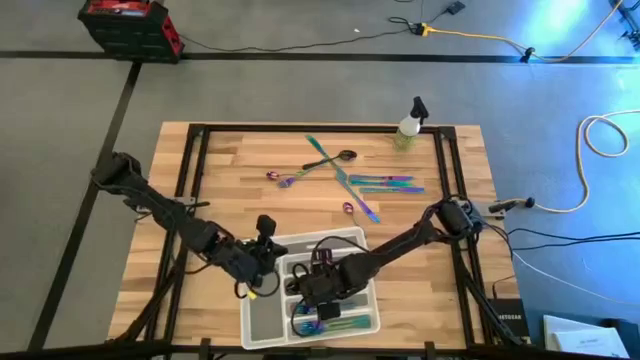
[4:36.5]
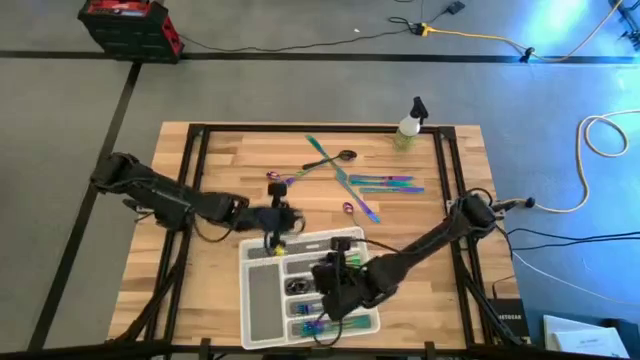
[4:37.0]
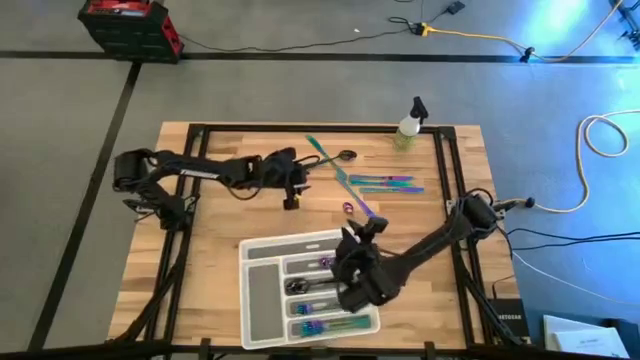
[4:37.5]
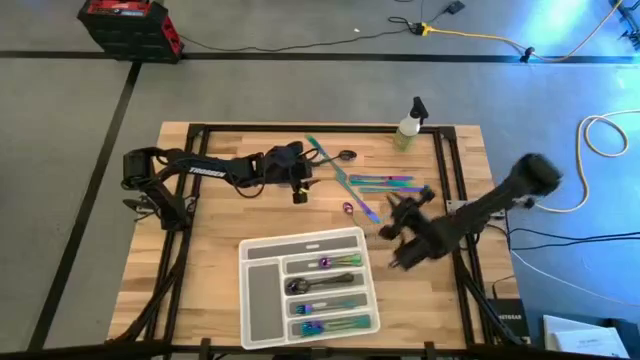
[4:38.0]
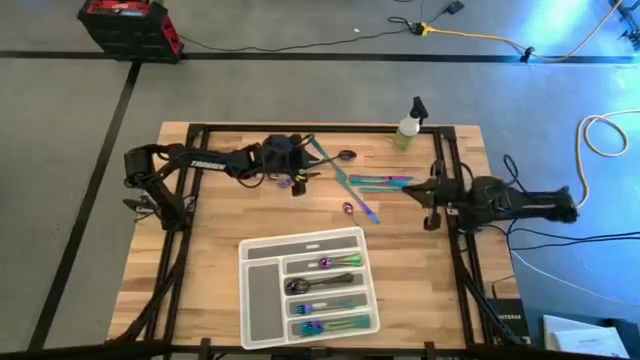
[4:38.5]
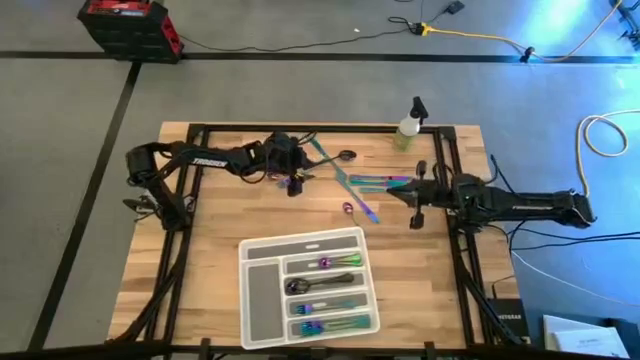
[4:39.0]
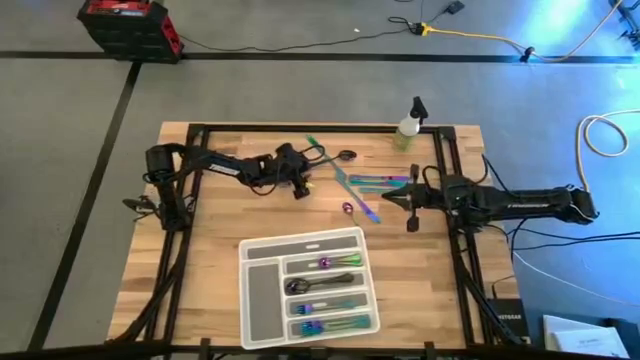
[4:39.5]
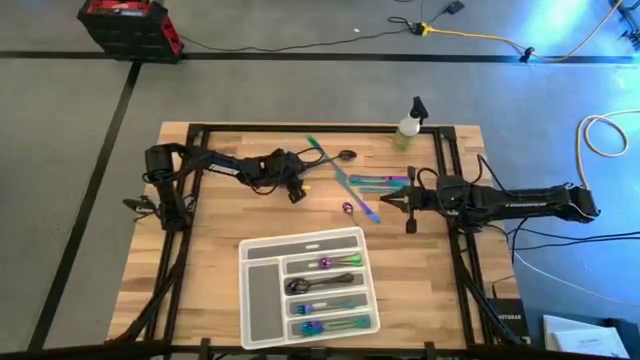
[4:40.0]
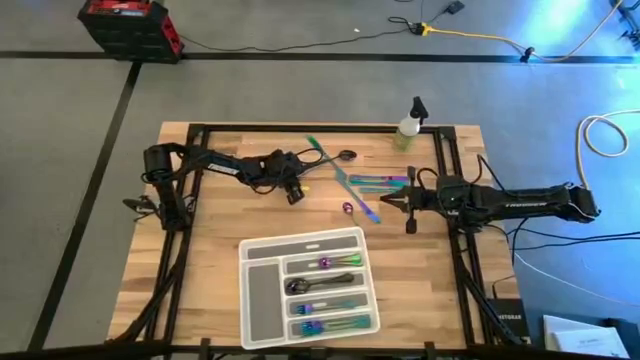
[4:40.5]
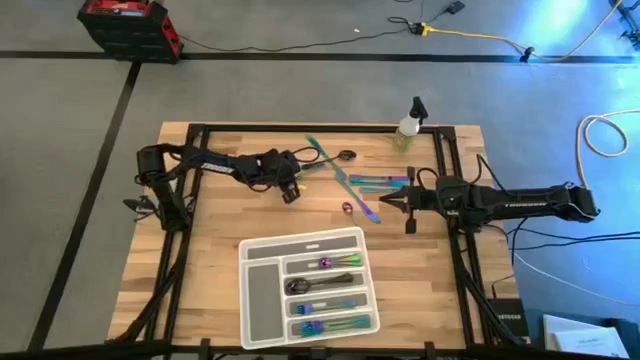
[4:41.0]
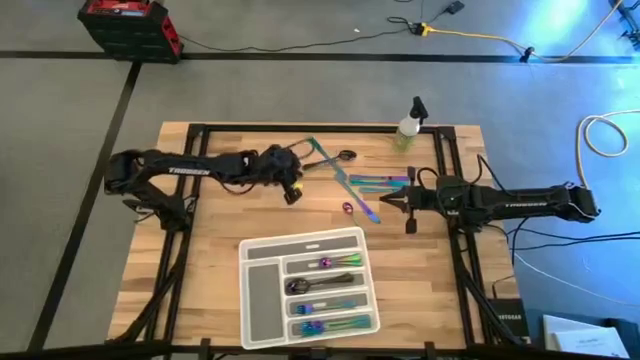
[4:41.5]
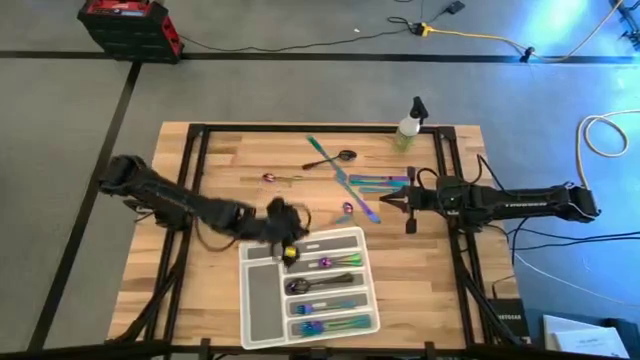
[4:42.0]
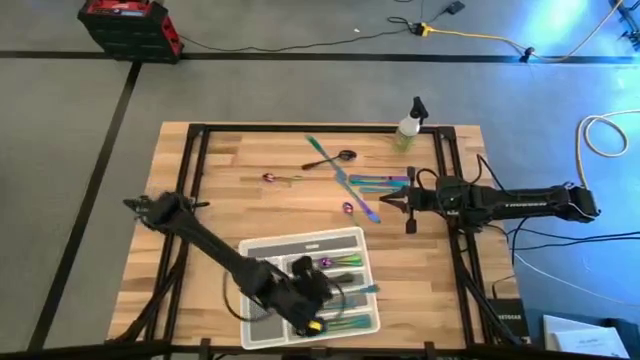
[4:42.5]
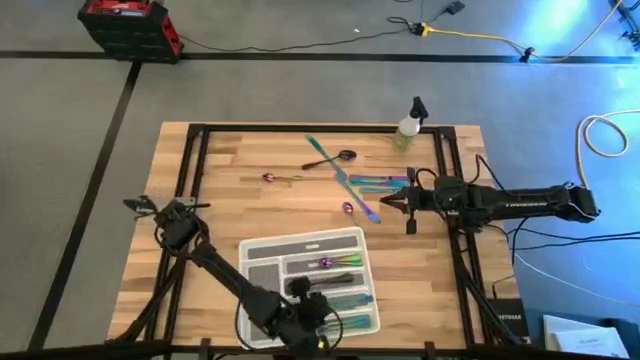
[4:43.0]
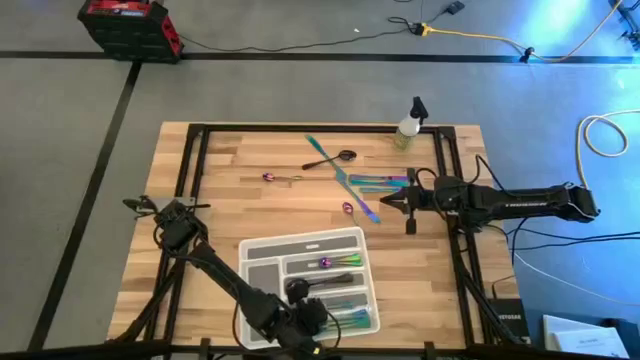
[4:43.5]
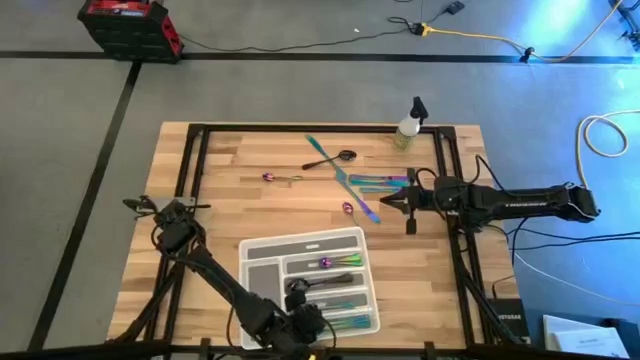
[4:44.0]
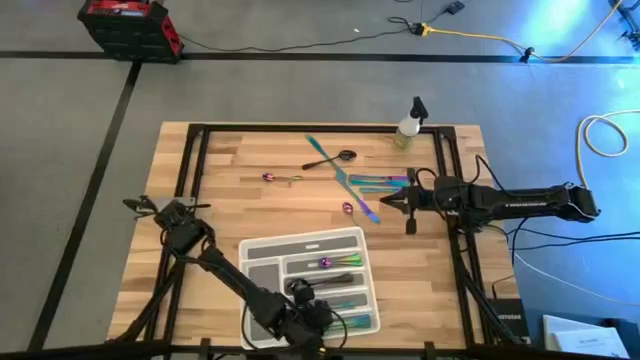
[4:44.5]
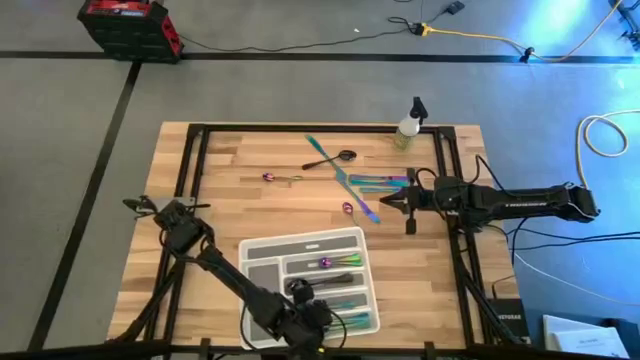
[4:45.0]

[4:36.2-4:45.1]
Task: Sort silverware
Put the blue fork into the white silver tray

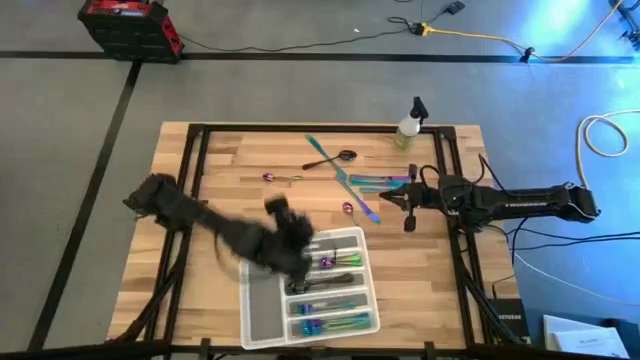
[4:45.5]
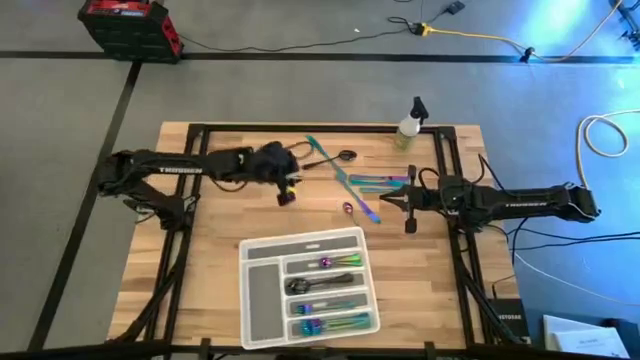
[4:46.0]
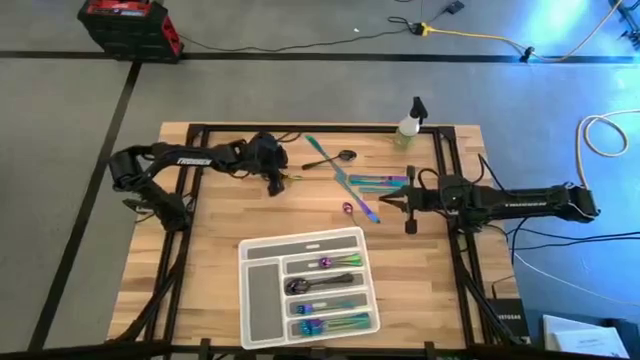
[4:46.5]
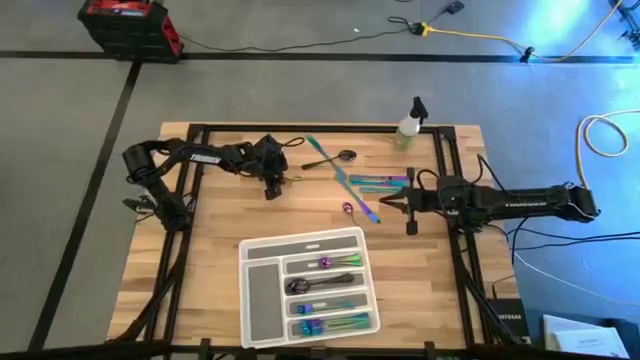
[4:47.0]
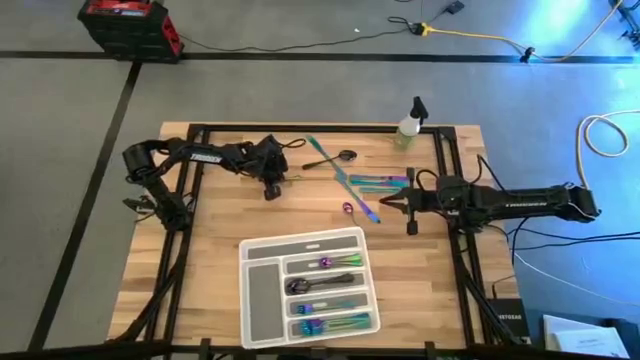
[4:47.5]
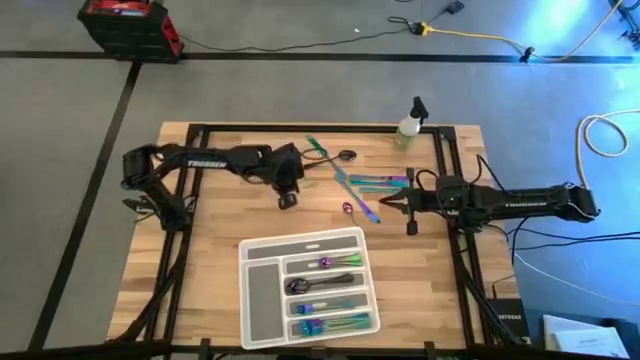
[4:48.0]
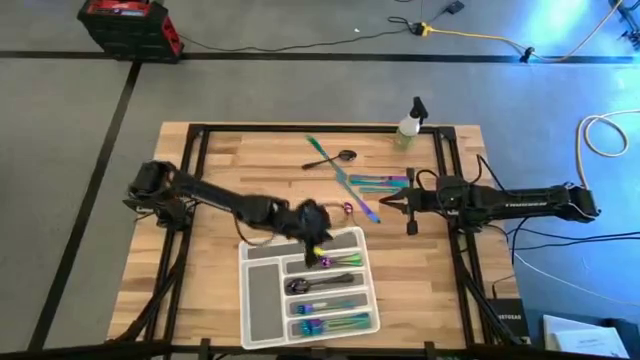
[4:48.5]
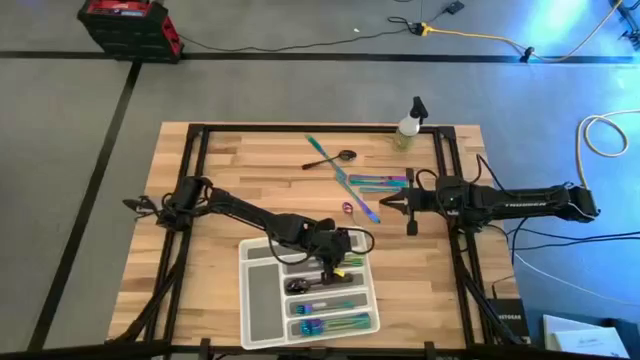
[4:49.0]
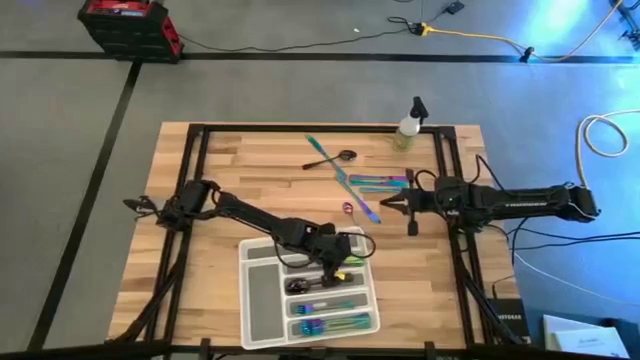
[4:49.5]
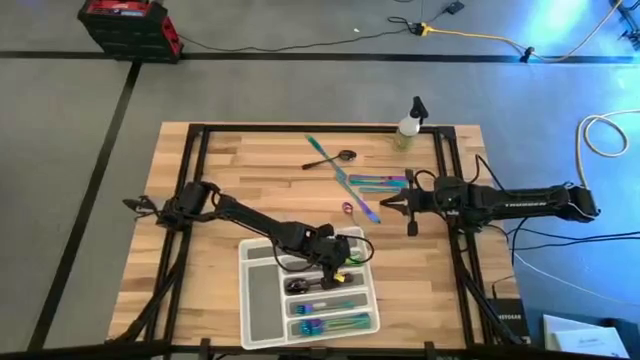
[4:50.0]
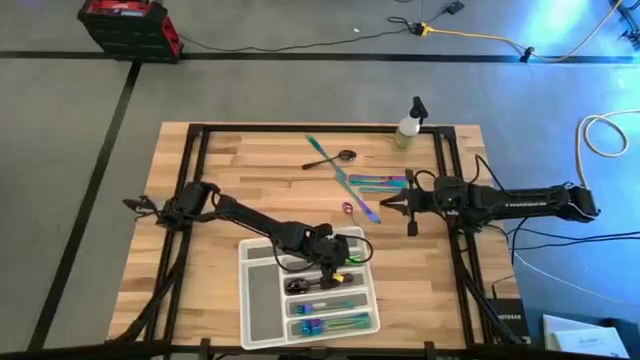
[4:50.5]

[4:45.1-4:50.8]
Put the blue spoon into the white silverware tray

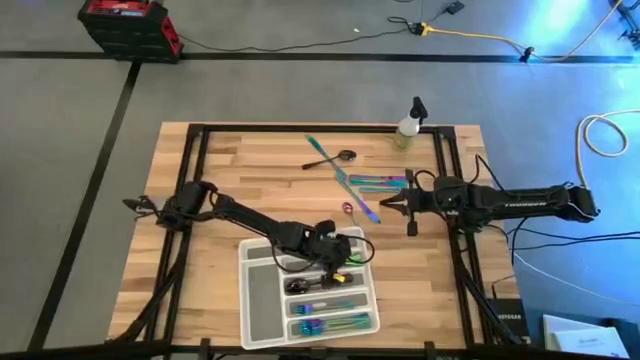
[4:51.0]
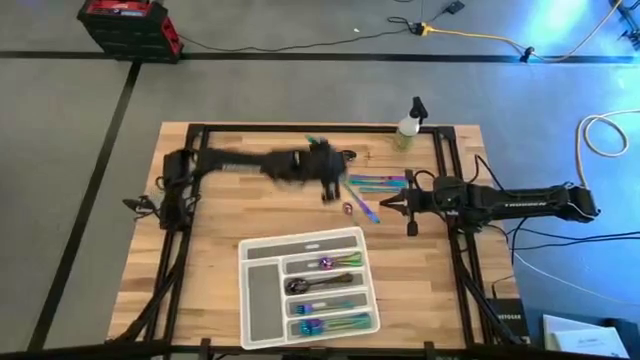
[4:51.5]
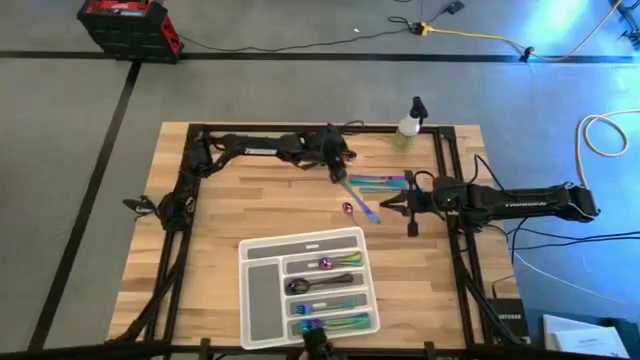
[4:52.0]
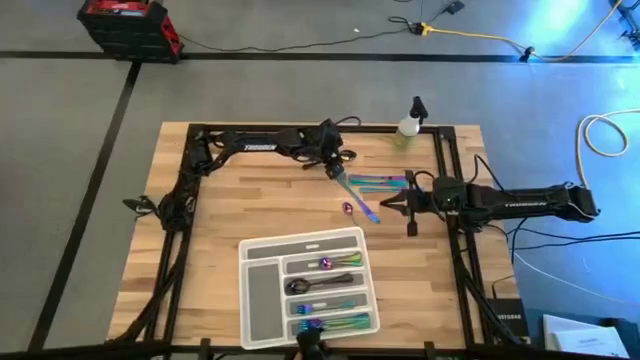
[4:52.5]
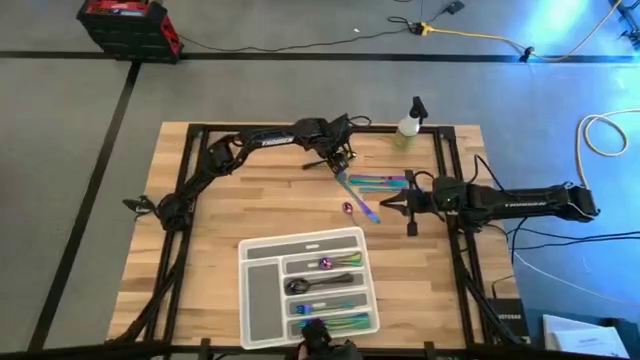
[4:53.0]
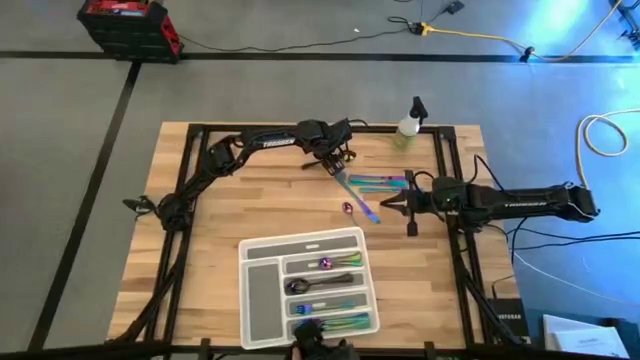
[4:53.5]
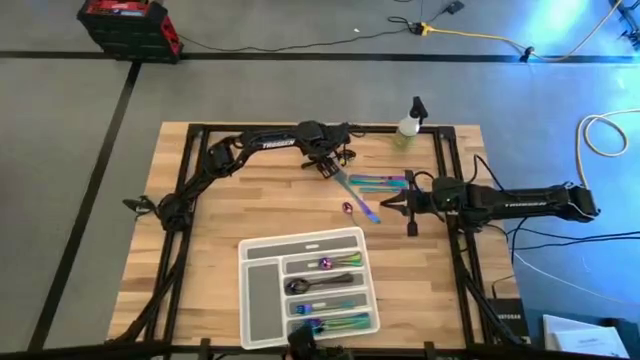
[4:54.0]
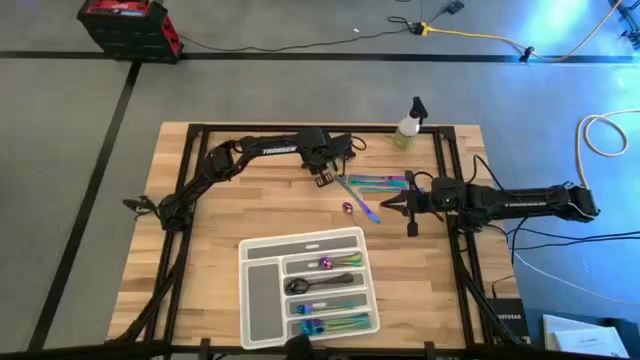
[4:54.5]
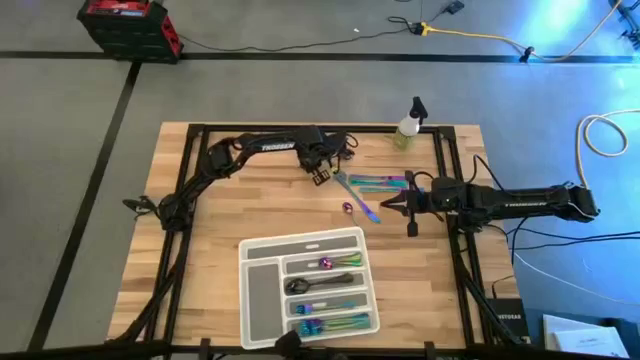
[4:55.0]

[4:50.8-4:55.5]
Put the black spoon into the white silverware tray

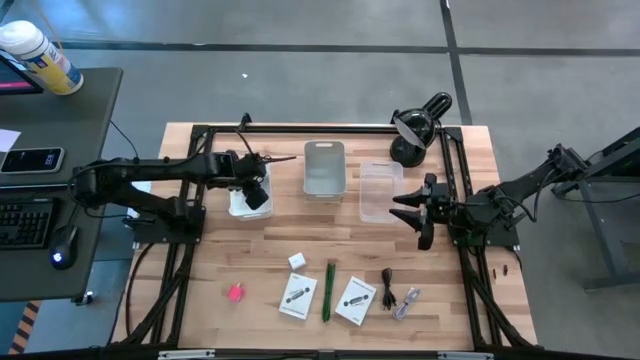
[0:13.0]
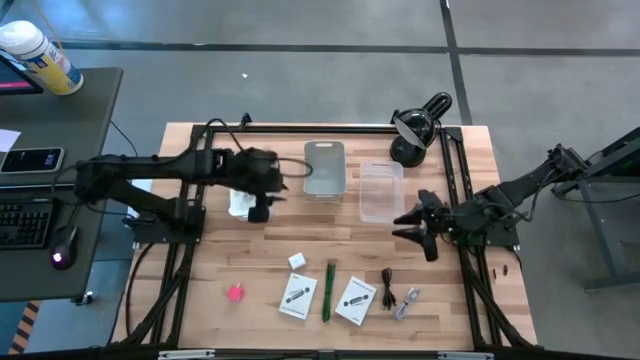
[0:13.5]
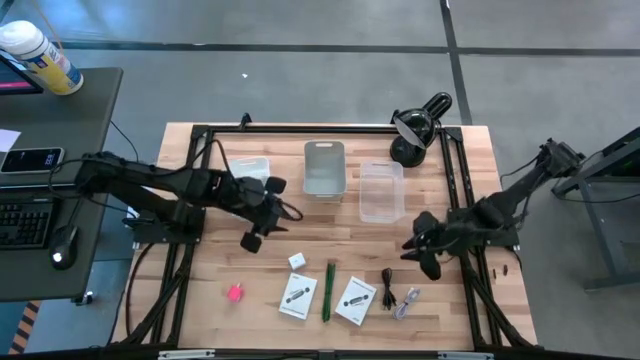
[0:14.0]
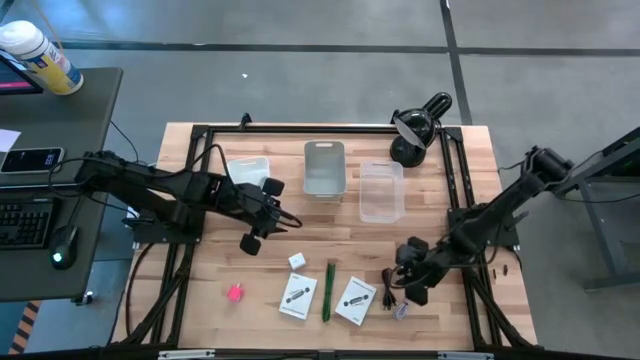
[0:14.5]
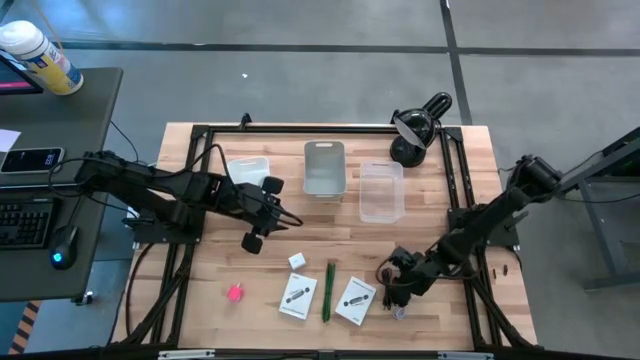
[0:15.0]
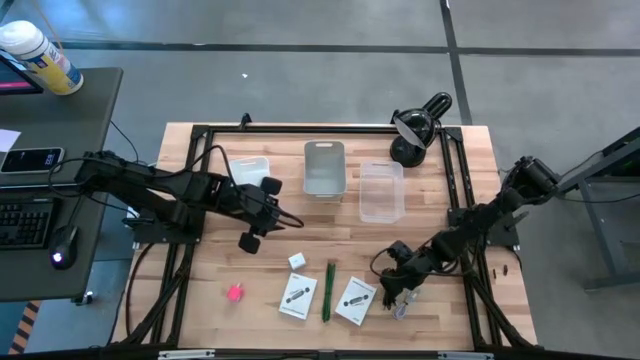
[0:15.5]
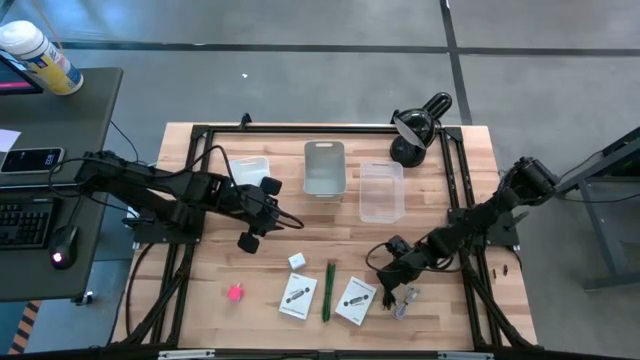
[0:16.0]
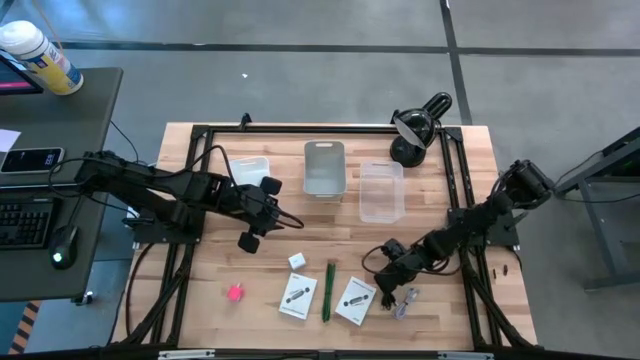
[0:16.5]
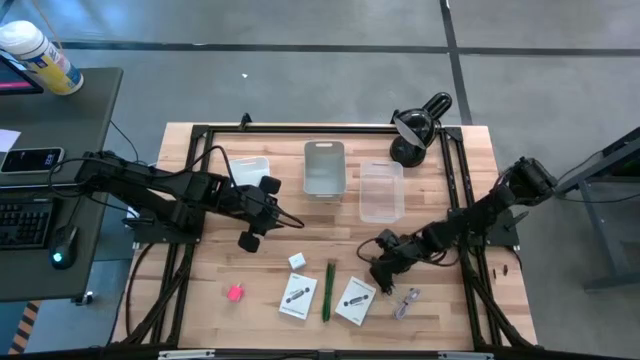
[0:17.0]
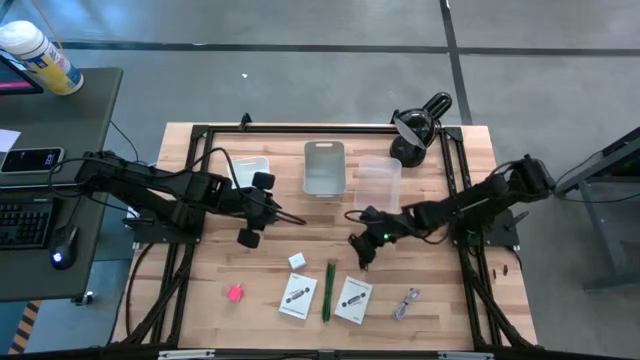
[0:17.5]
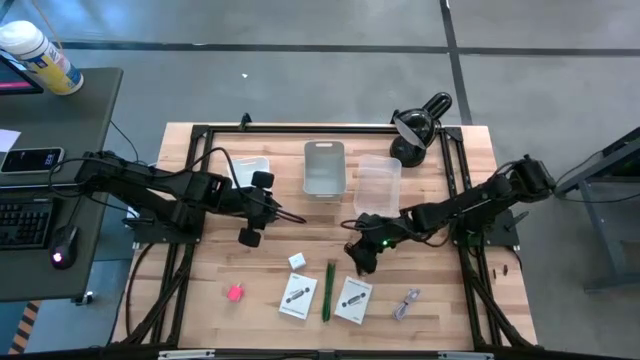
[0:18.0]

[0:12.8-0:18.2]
Task: Pick and place items into bin
Move the black USB cable to the center of the table
